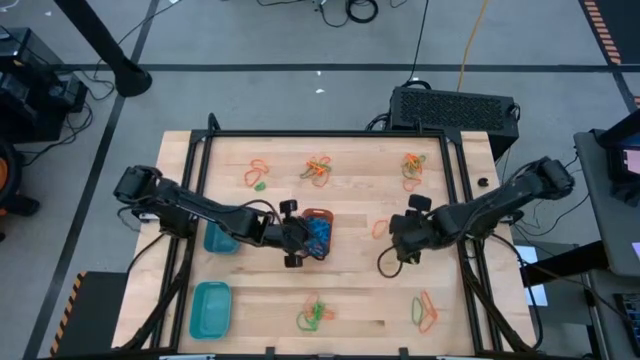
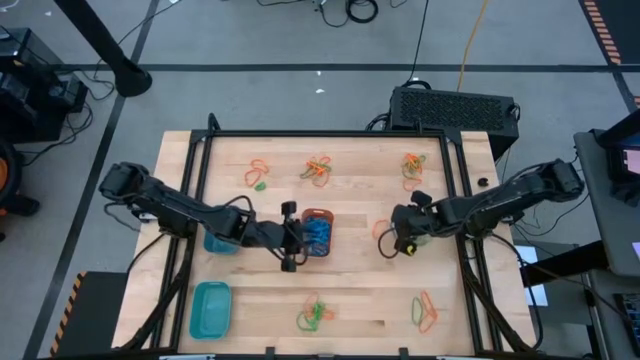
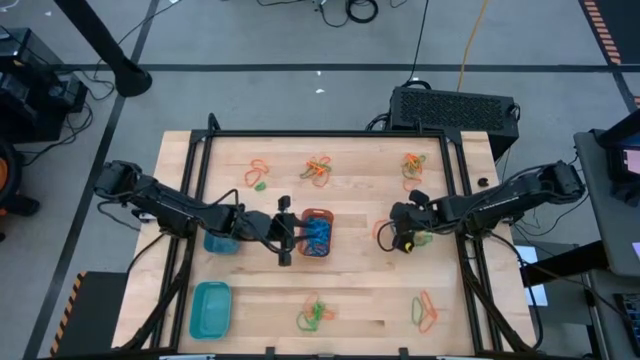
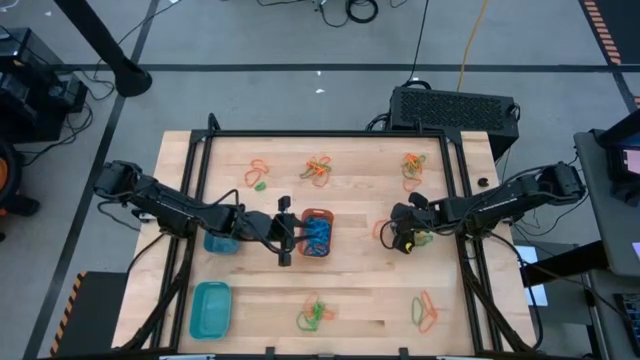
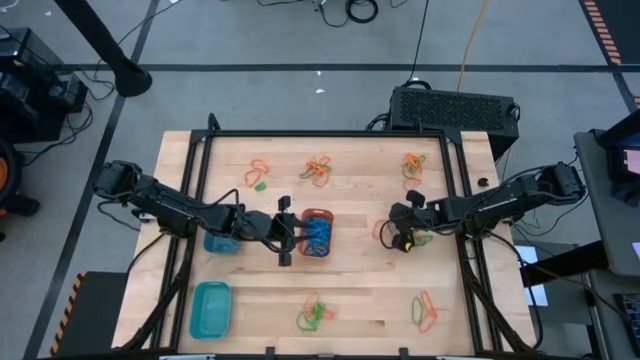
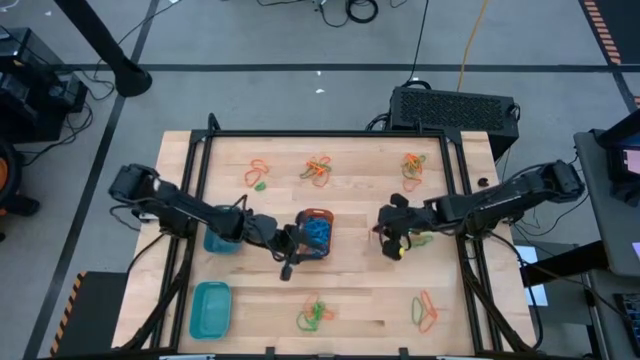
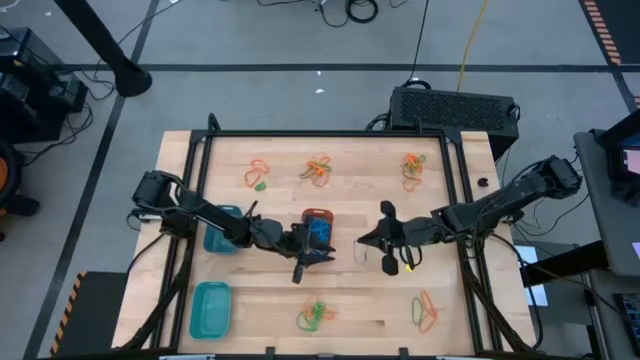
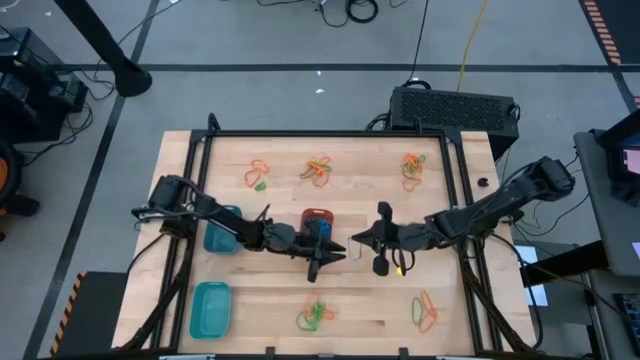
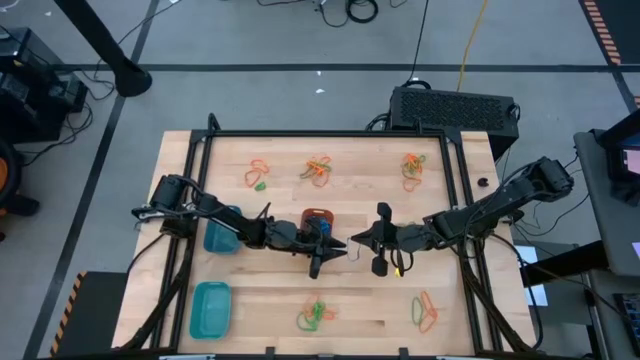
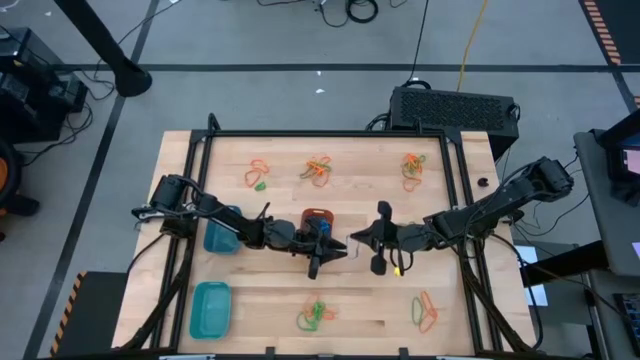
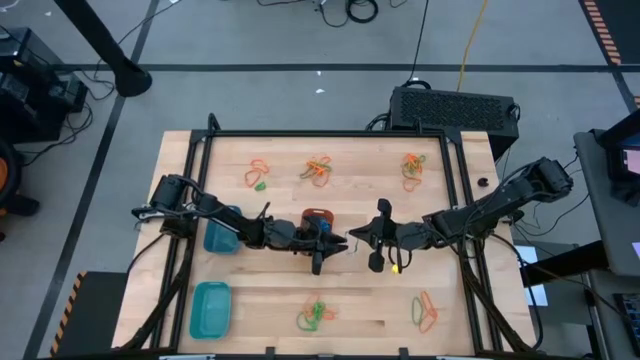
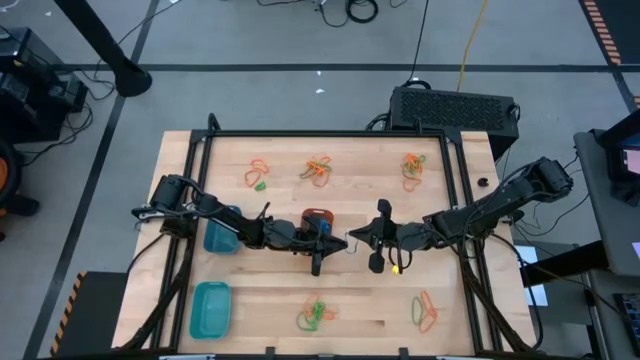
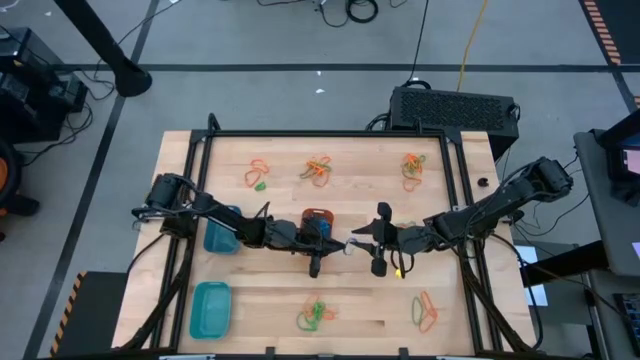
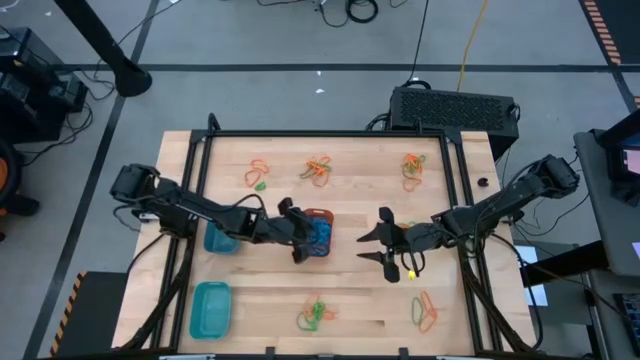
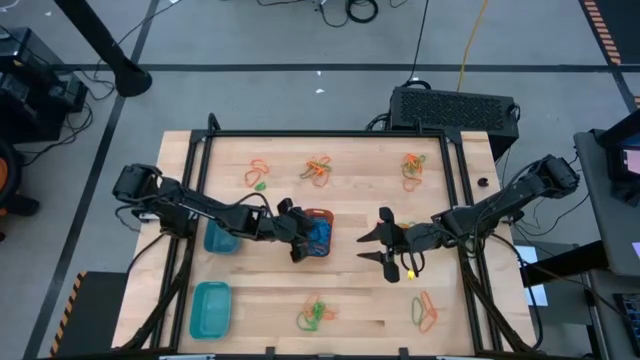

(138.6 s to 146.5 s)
Task: Sort rubber bands into baskets
Put the blue rubber band into the orange bin

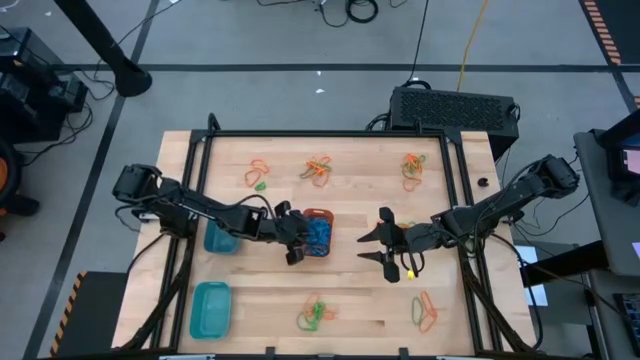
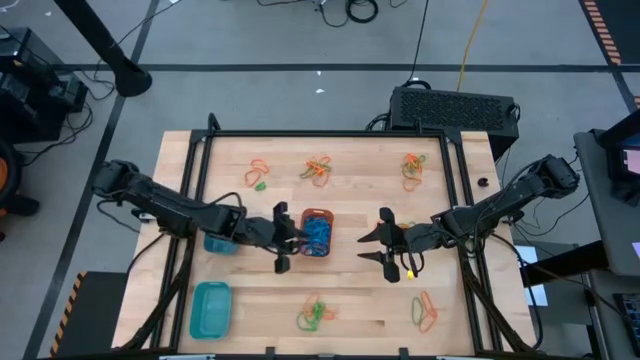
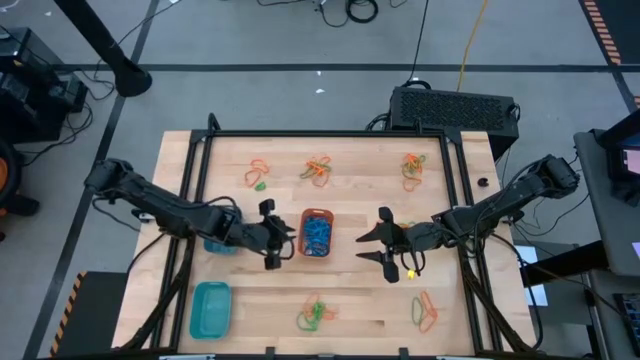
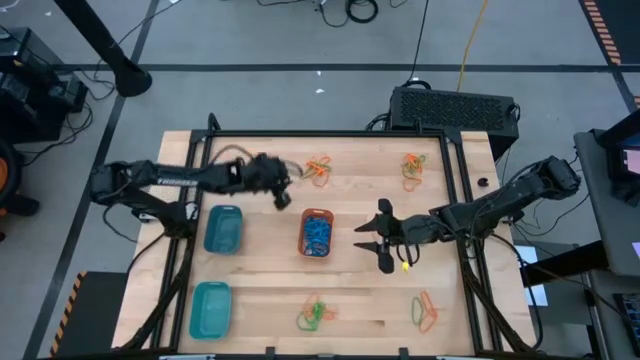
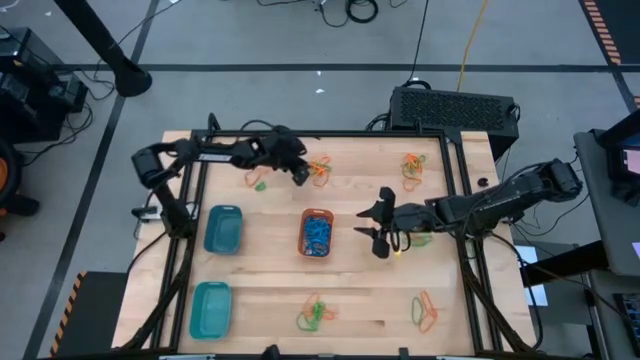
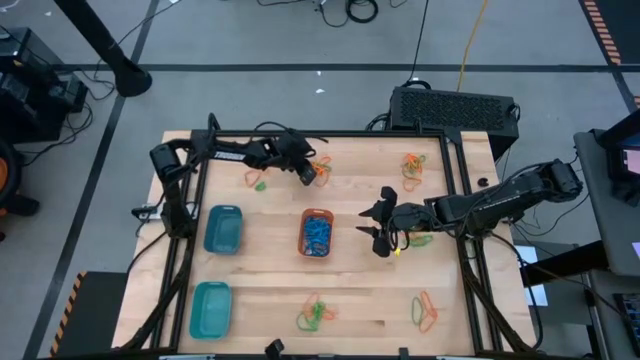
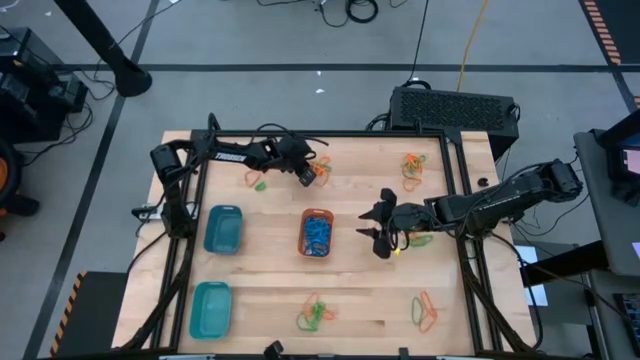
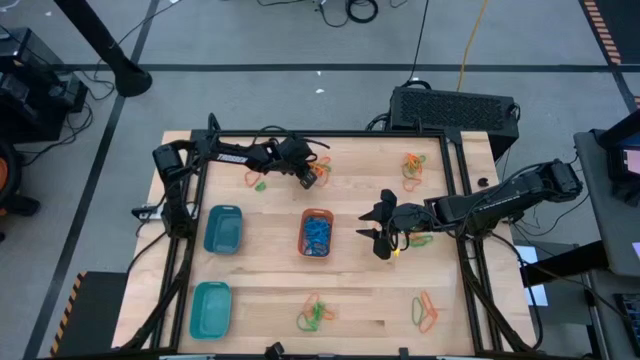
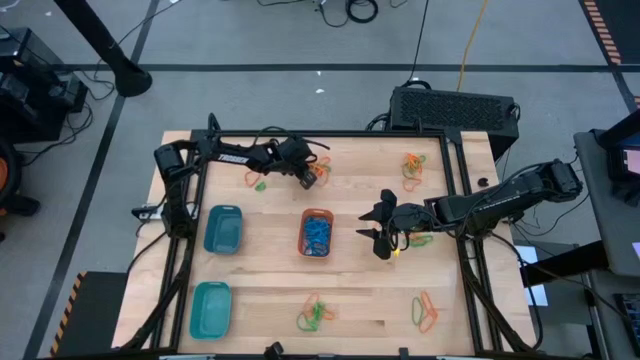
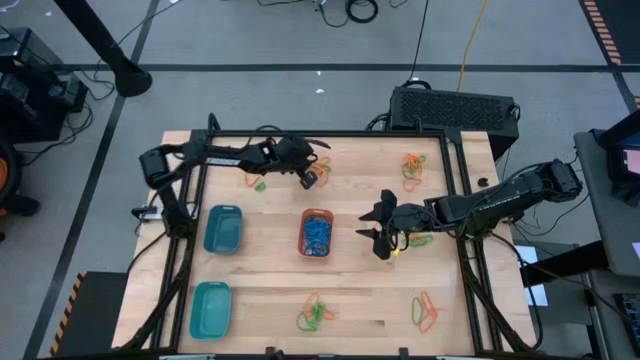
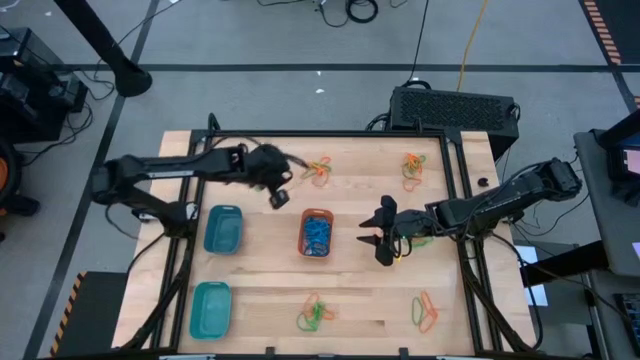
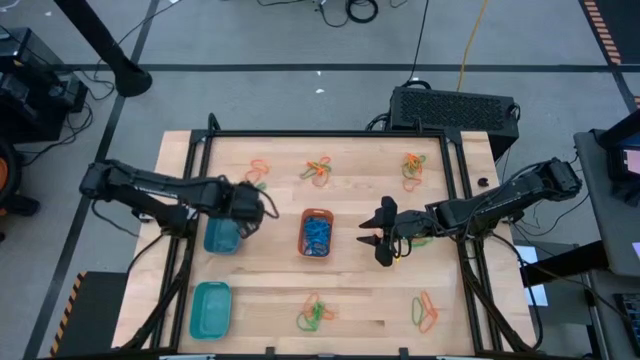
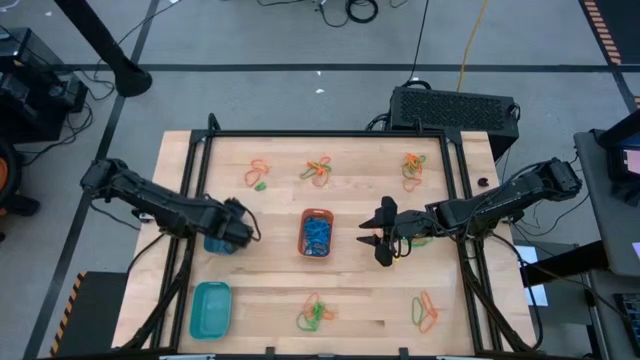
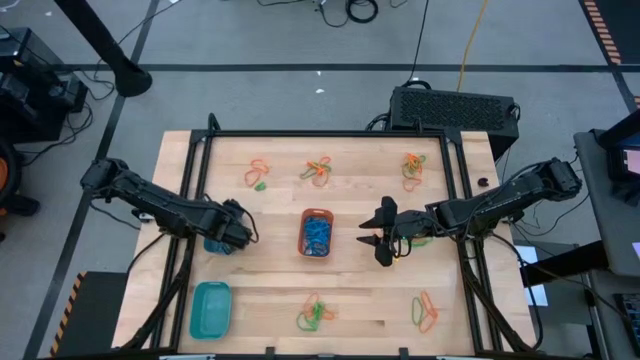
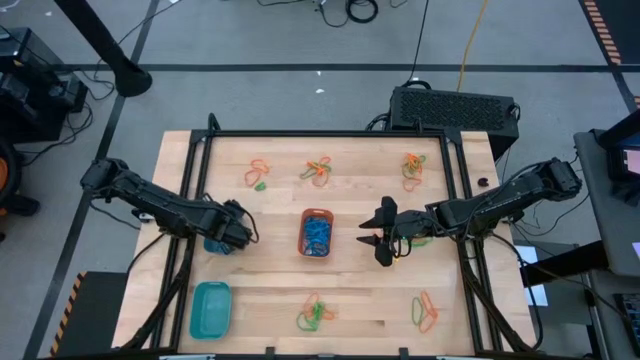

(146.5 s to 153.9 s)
Put the orange rubber band into the blue bin

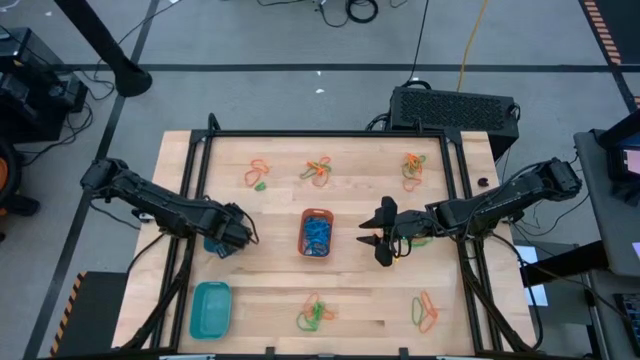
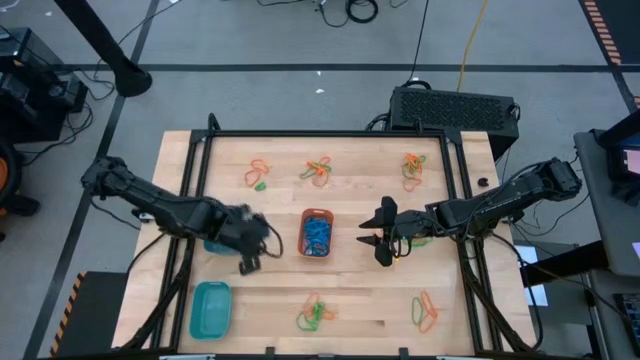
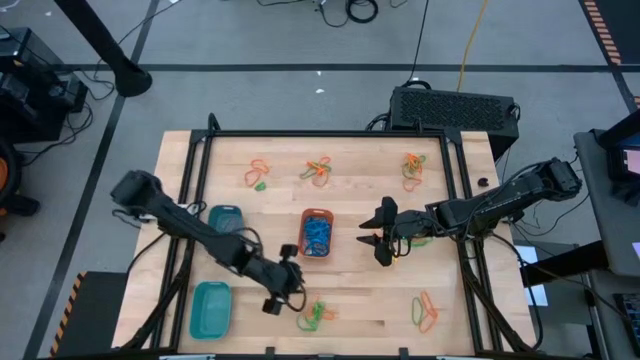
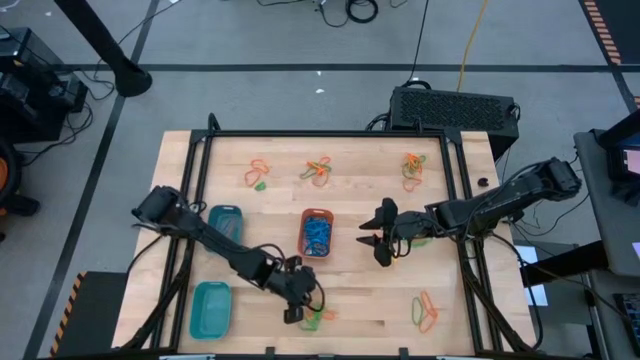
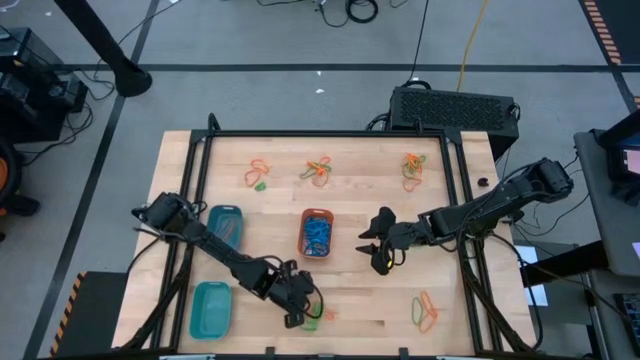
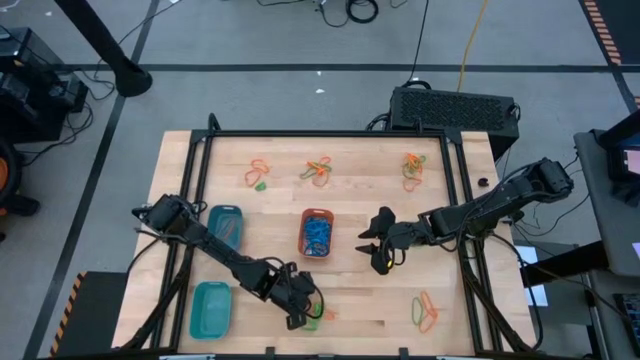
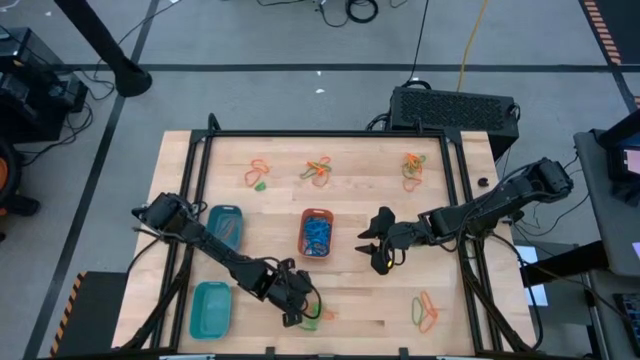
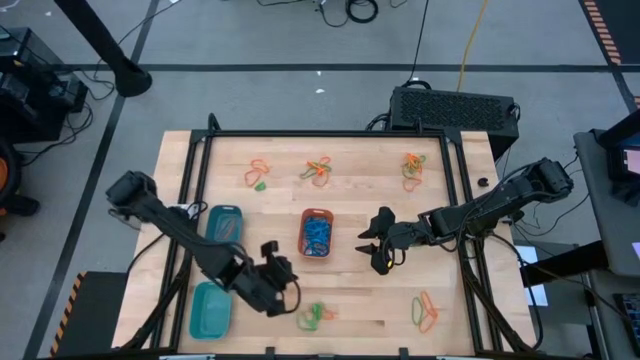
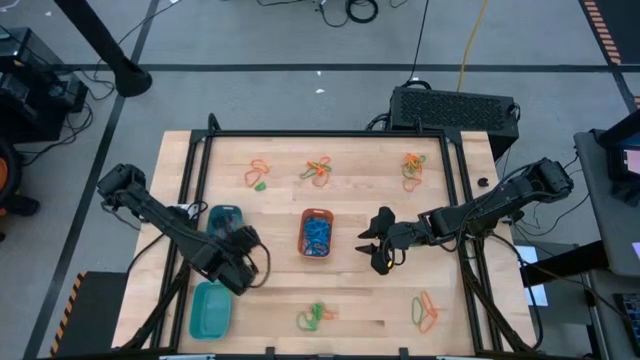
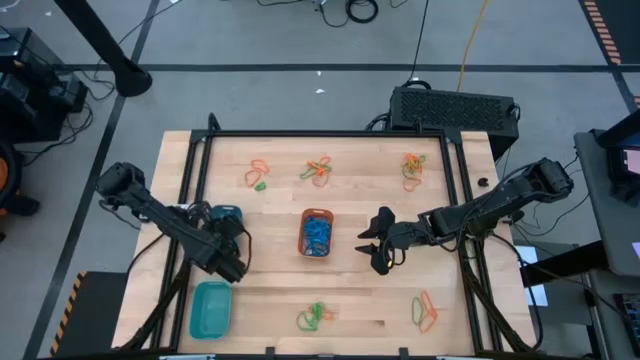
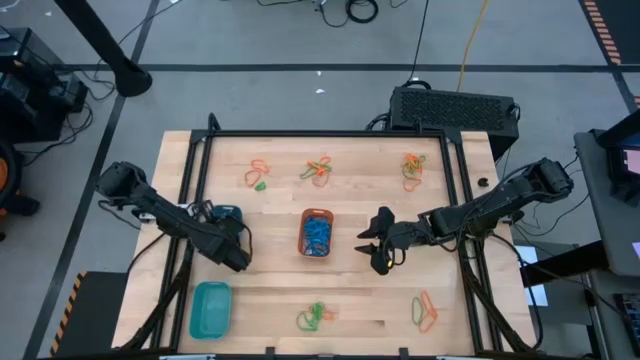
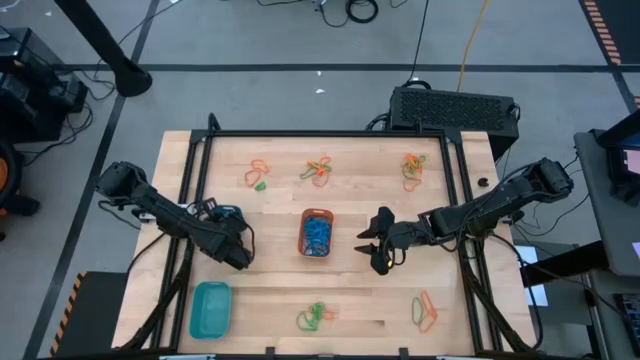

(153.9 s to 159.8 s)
Put the orange rubber band into the blue bin
